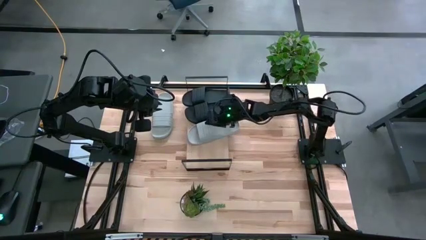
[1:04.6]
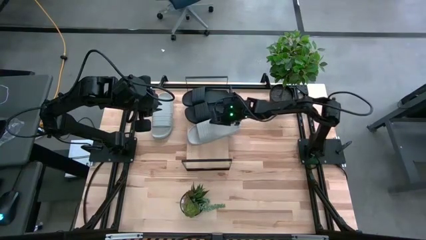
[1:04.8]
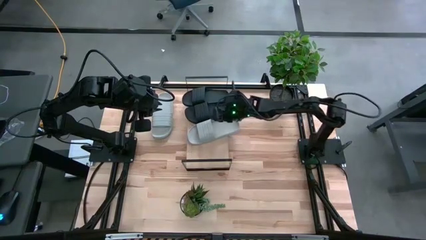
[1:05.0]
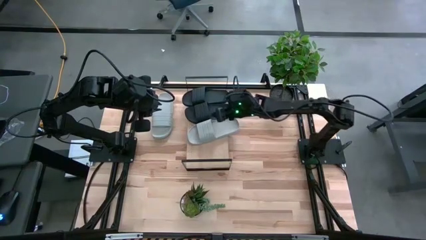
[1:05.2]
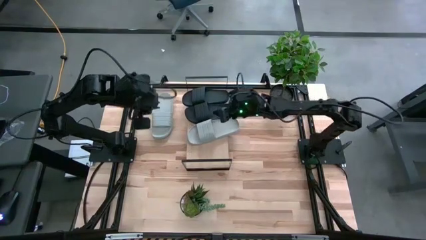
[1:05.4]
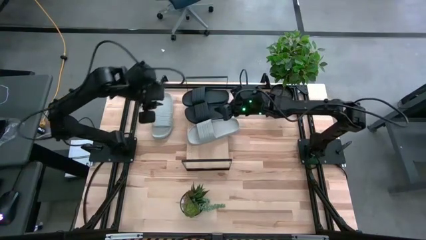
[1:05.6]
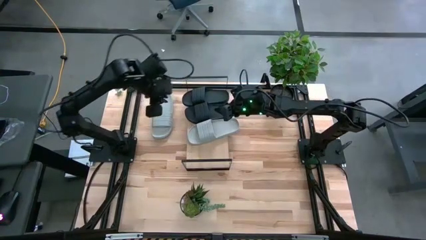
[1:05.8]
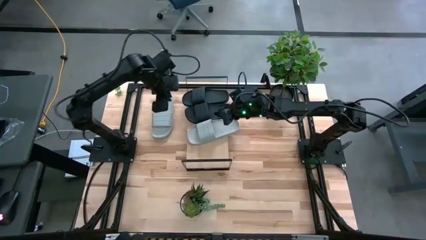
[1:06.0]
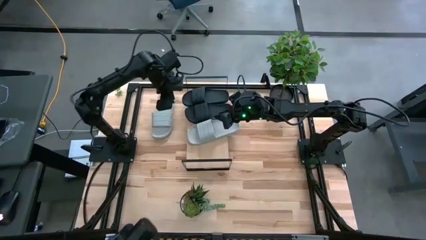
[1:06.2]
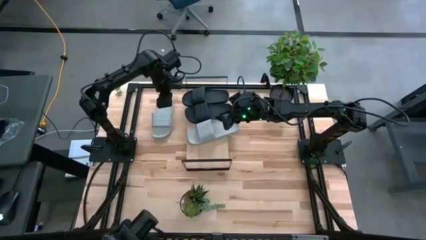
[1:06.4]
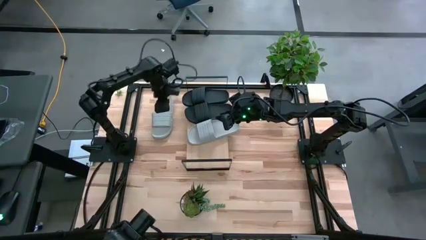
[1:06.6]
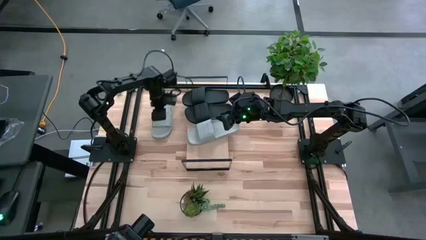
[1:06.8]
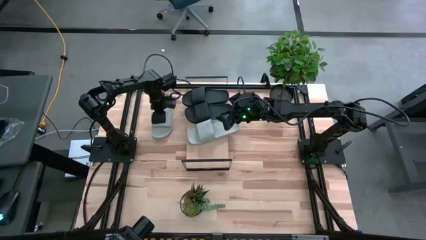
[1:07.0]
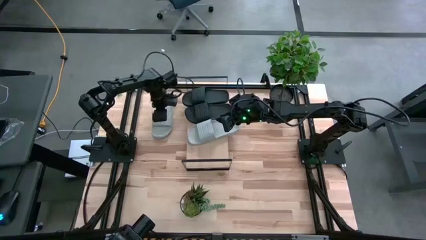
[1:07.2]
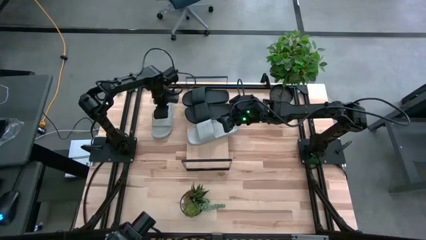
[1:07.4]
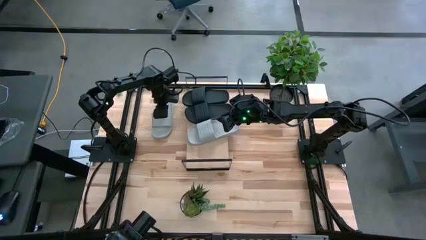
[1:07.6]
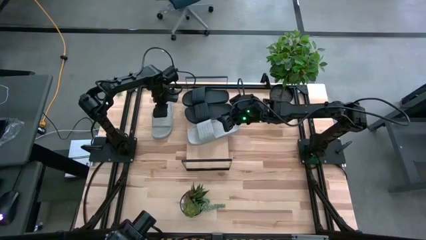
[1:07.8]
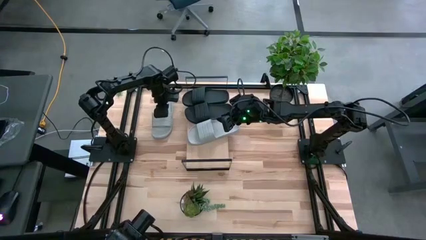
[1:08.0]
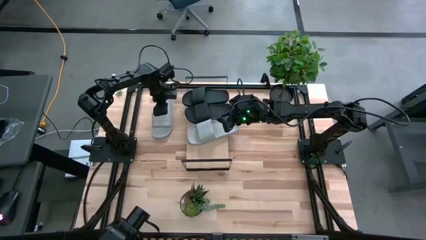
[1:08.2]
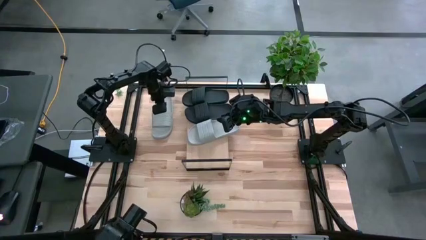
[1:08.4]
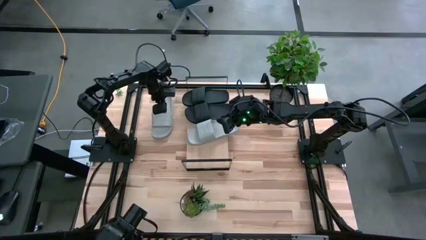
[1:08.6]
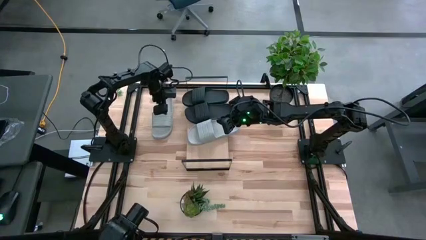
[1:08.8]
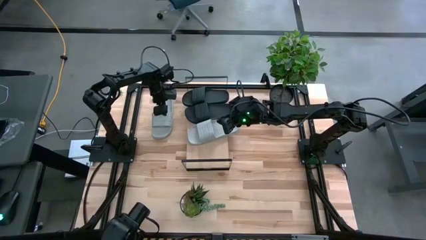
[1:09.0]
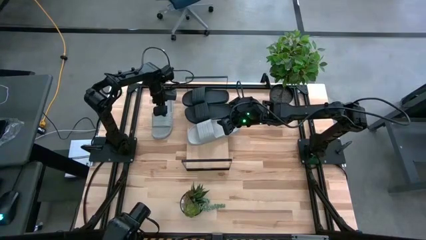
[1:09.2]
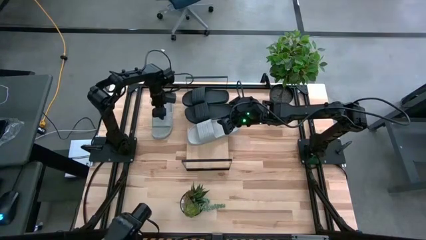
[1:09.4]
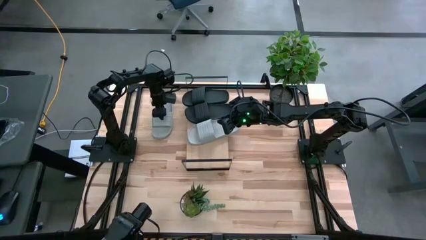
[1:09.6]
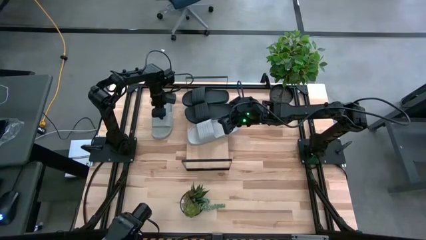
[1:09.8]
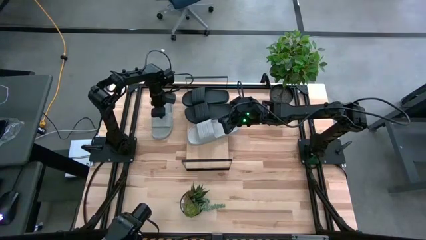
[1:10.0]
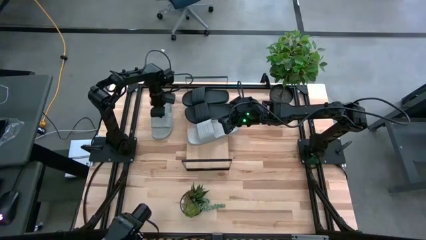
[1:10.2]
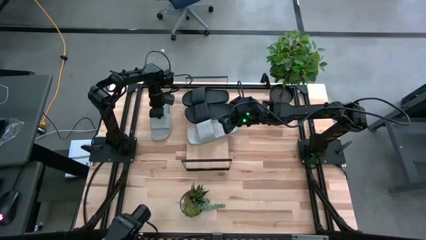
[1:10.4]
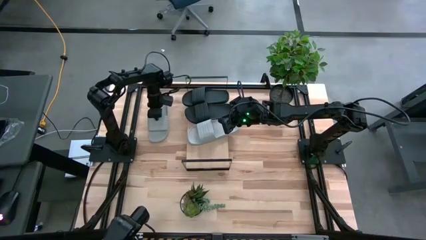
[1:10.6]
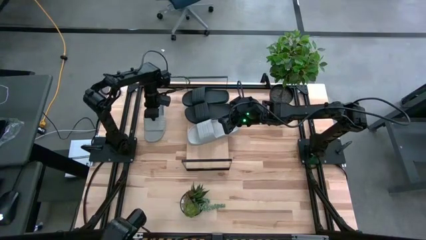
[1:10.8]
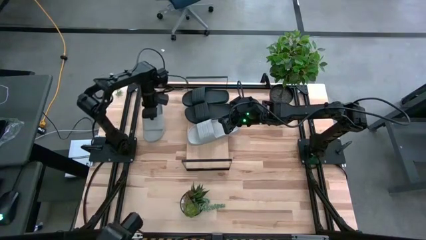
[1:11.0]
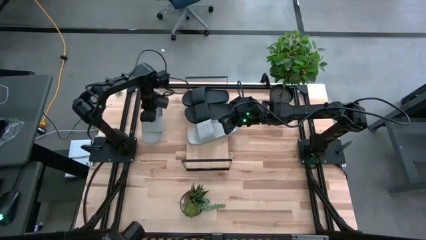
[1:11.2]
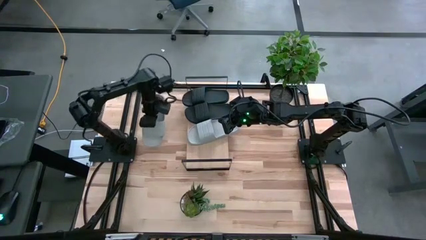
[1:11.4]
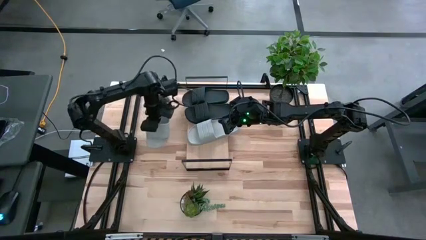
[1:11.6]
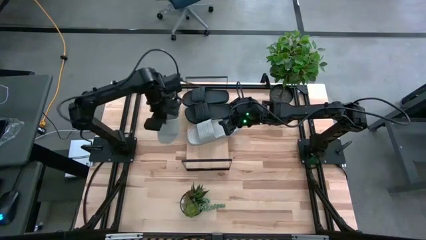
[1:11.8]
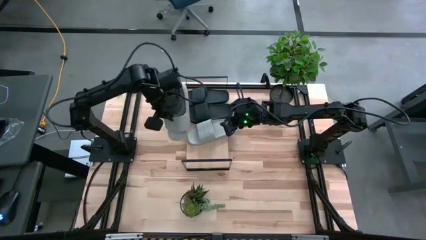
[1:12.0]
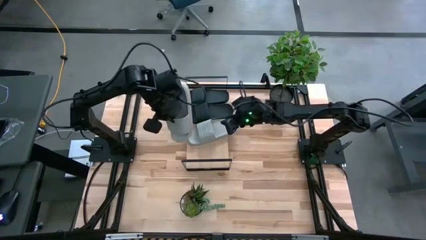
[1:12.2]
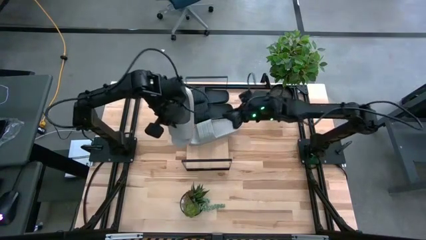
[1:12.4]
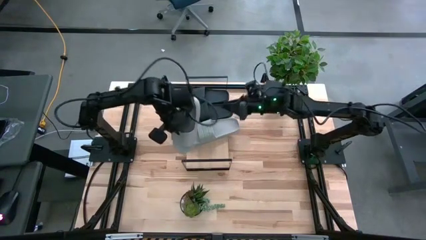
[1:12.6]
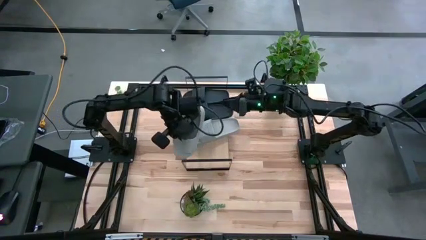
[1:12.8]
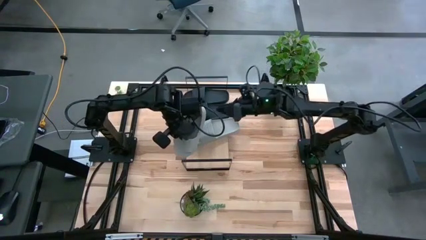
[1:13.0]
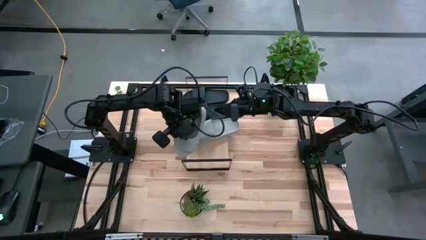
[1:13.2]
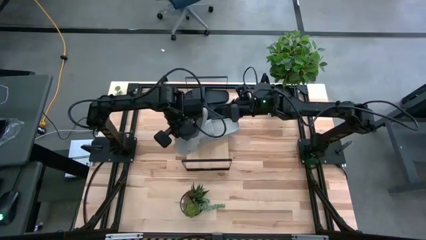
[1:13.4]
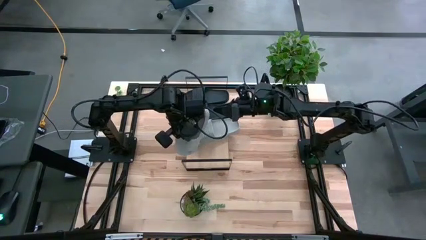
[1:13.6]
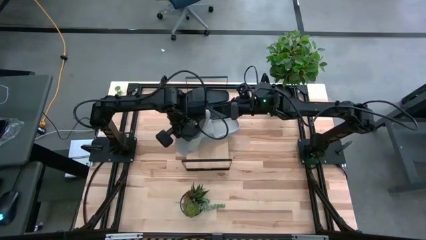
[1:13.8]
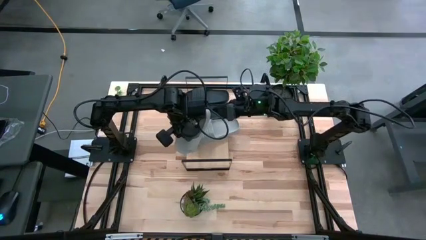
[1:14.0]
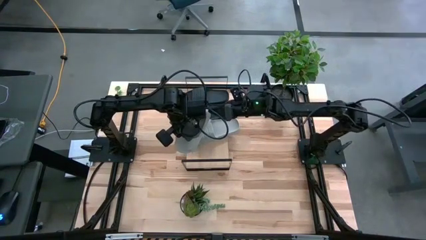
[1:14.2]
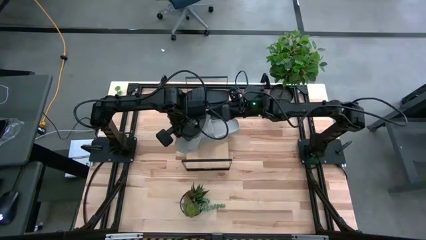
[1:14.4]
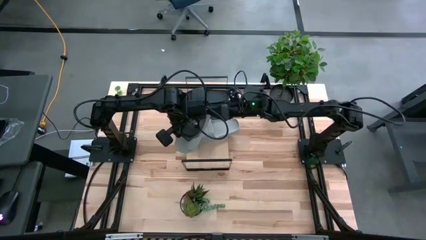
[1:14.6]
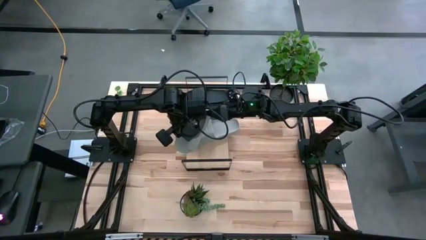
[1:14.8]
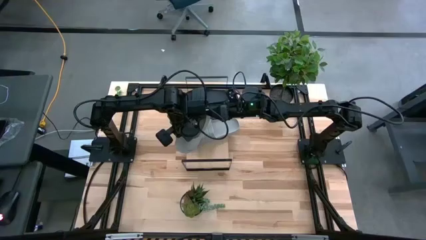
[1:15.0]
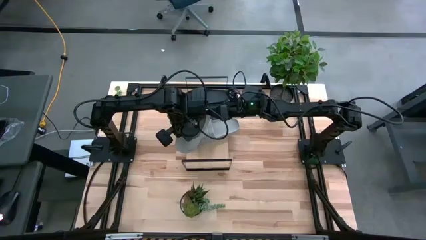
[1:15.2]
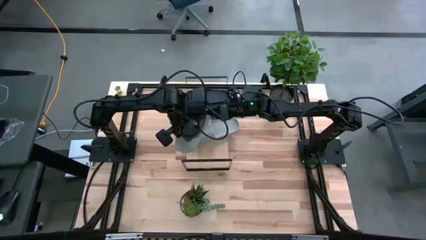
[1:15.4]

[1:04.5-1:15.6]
Task: Pick and place slides into the shelf
Put the gray slipper slide on the shelf
